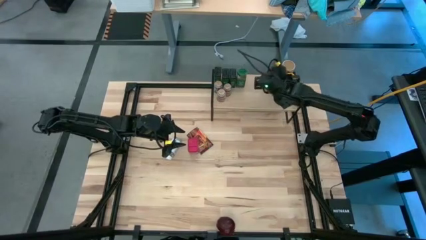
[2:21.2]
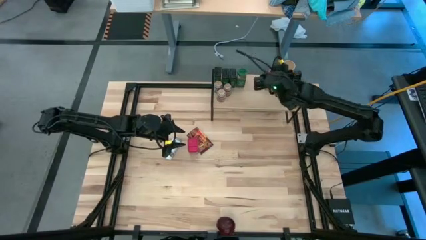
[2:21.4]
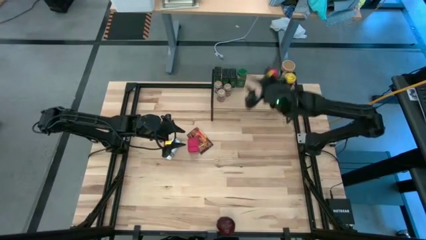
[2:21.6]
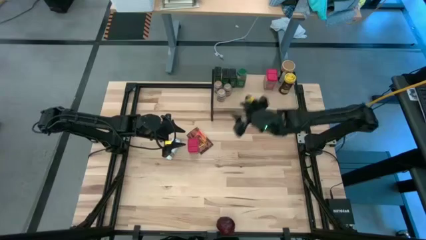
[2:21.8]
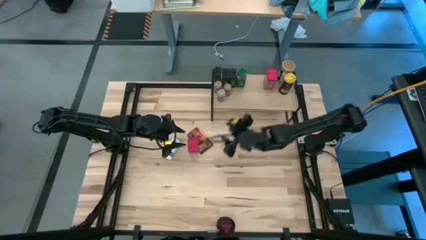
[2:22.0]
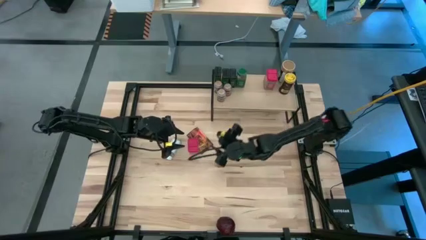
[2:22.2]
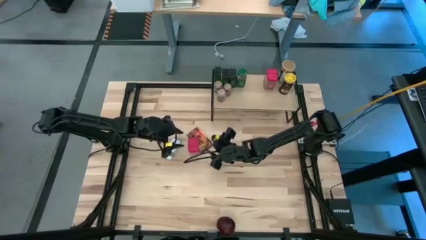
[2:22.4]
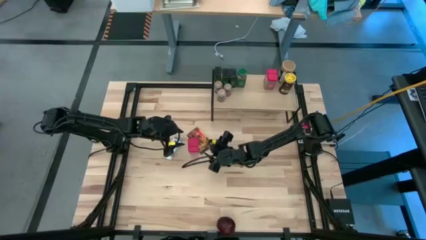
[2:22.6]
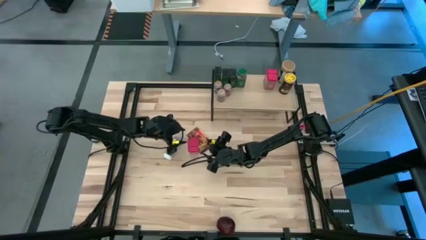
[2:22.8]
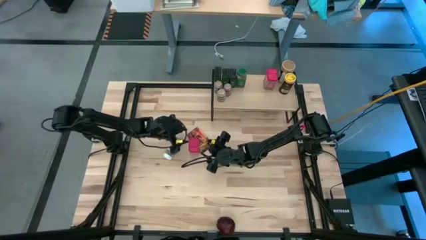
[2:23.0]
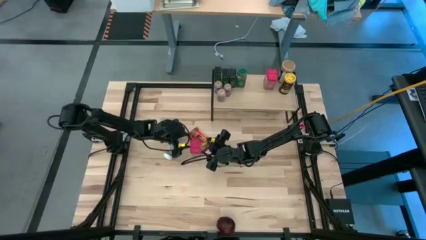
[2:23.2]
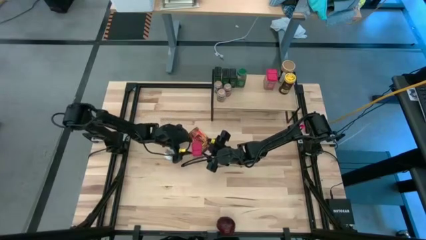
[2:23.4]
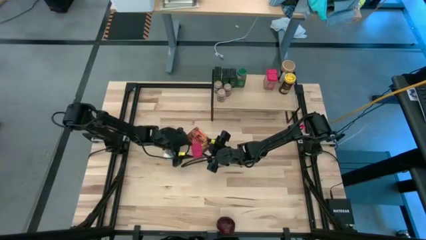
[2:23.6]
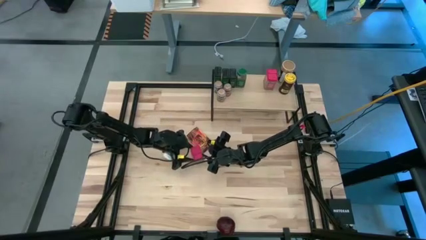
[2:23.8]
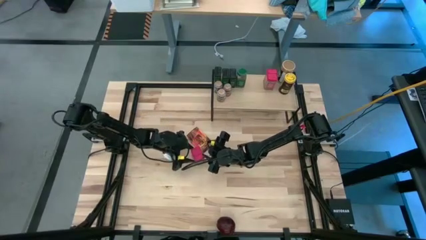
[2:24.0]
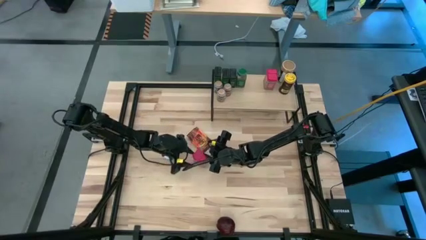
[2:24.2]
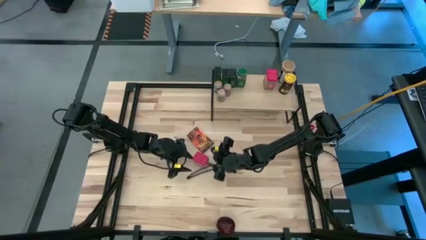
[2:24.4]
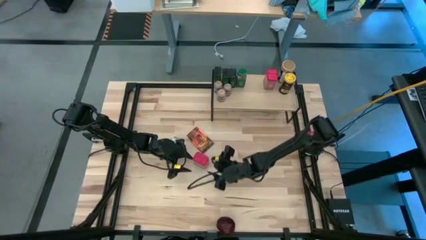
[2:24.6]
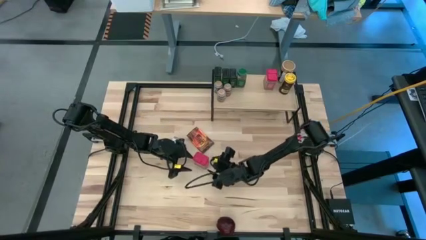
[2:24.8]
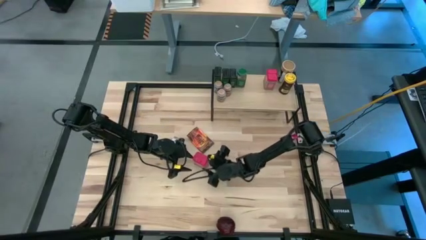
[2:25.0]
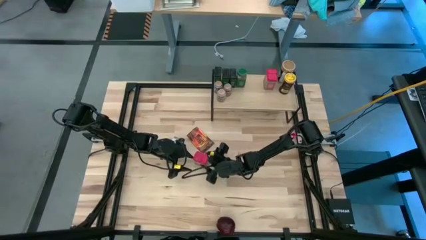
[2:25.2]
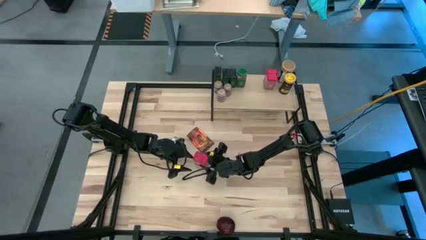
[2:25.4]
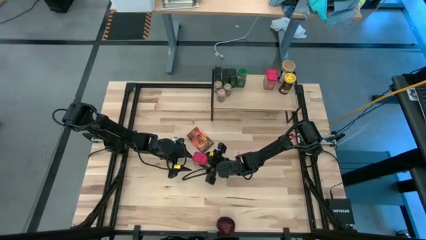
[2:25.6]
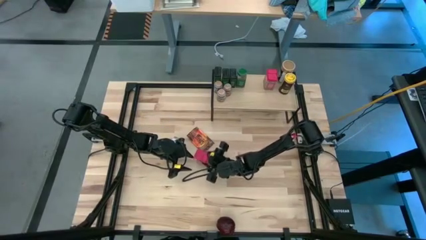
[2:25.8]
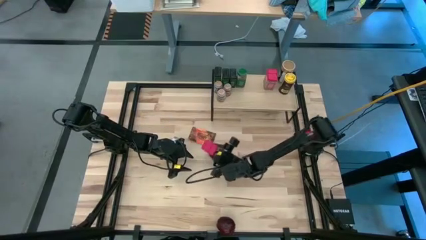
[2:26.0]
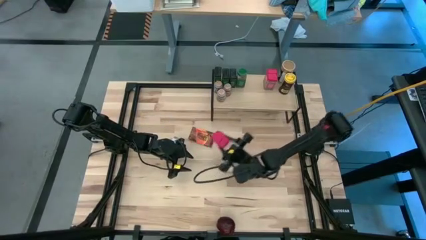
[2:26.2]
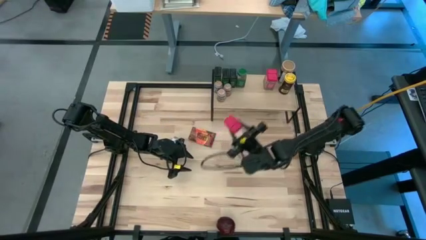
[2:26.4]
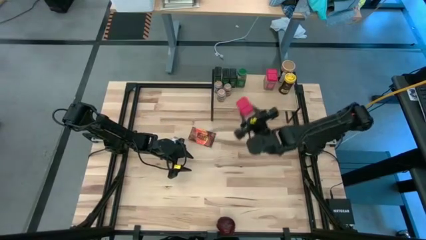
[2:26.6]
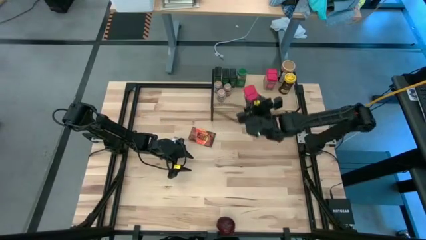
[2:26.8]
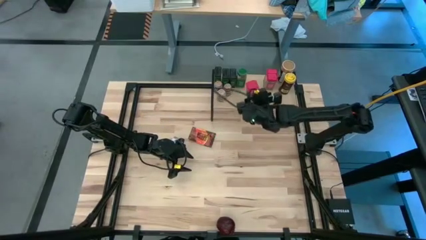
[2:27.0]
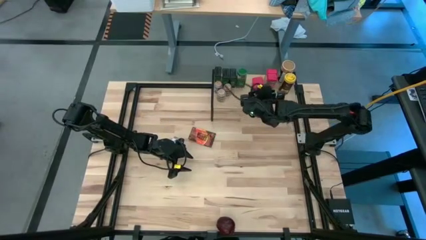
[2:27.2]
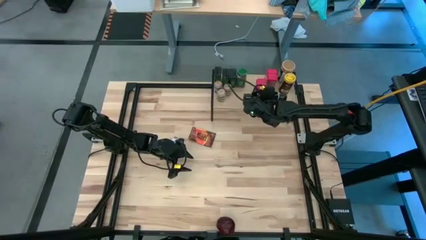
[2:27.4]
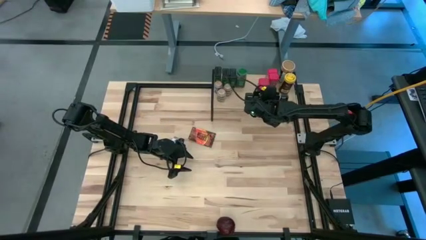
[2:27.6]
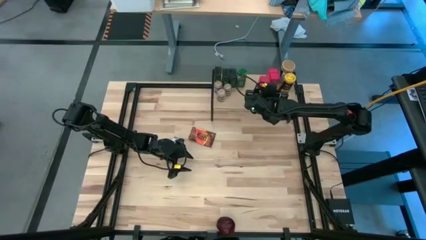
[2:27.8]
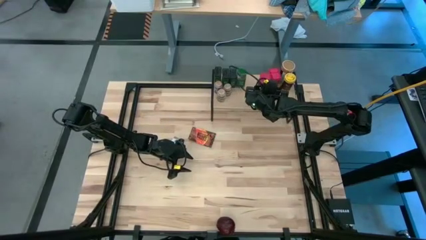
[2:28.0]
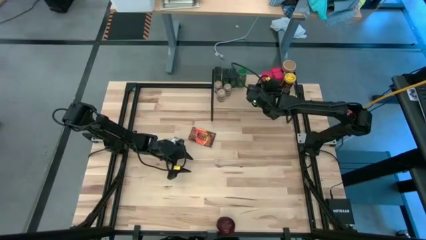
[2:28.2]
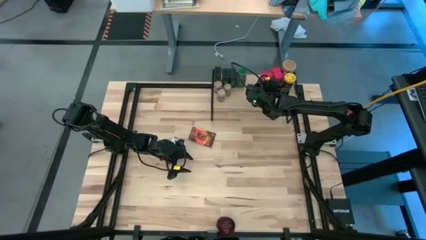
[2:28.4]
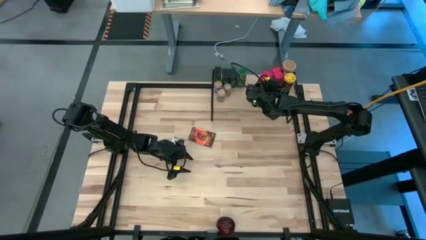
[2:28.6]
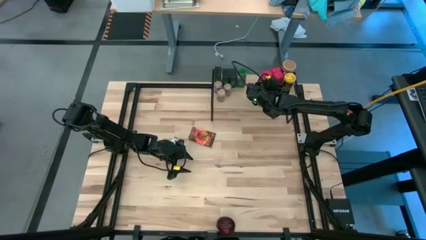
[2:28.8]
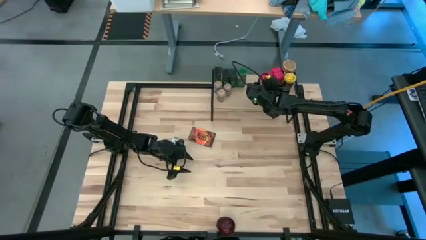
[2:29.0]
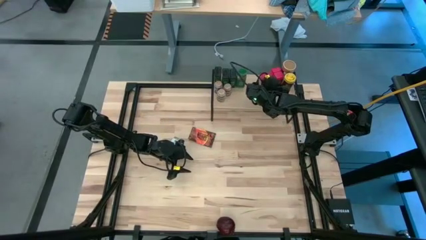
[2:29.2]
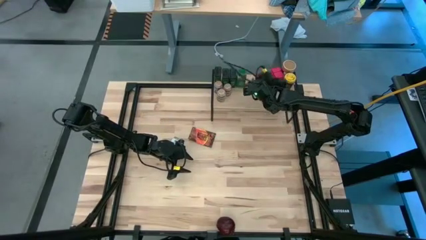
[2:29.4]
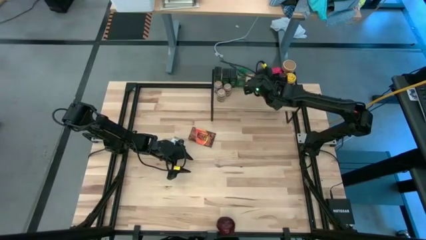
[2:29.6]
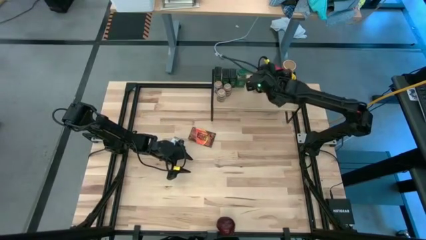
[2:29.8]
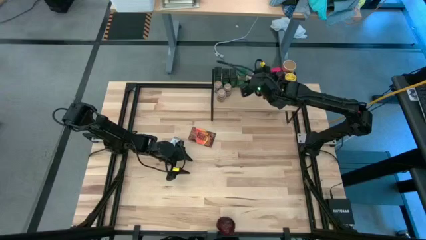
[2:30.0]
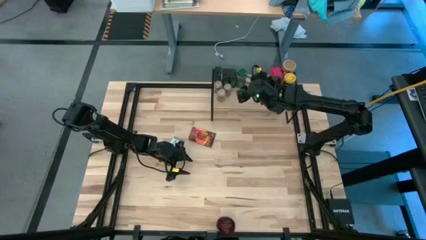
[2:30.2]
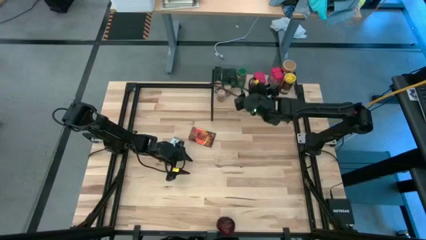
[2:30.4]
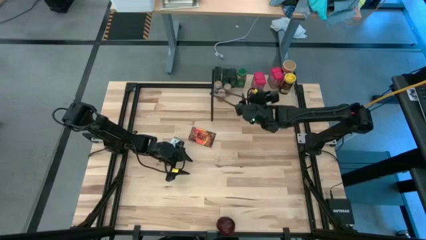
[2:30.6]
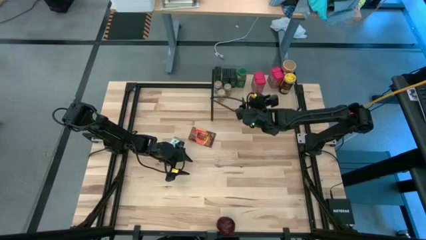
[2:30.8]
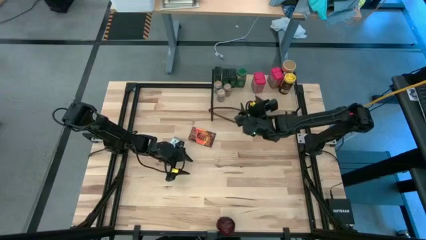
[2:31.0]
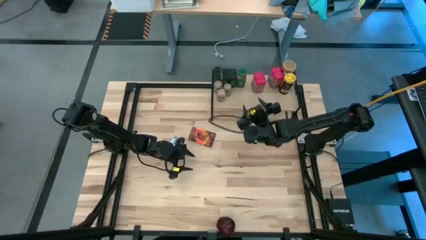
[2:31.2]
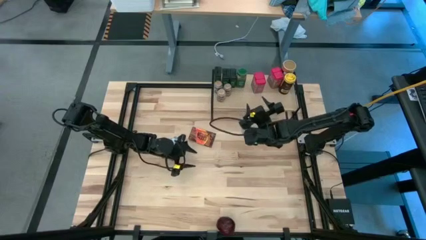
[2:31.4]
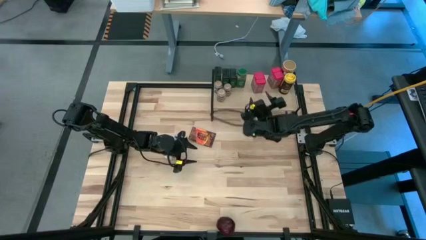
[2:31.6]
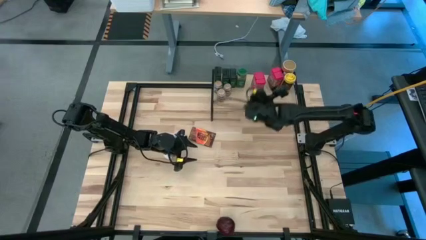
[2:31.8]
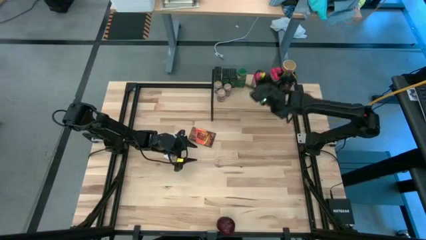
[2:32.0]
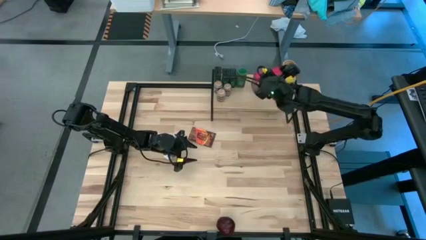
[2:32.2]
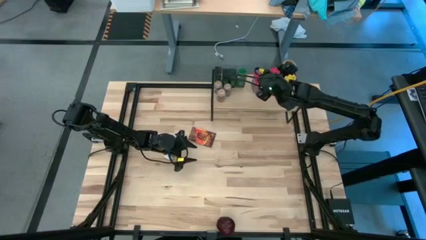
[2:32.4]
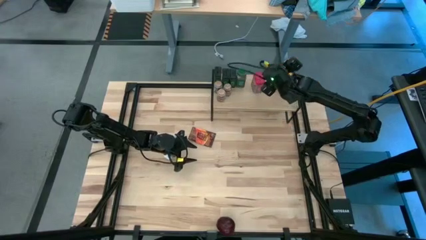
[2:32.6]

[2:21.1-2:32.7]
Task: Shelf spices
Put the red seasoning can on the shelf

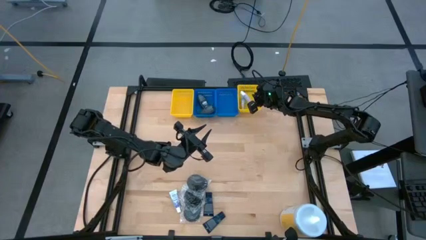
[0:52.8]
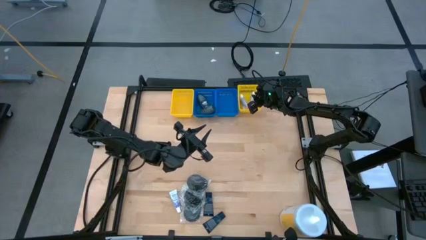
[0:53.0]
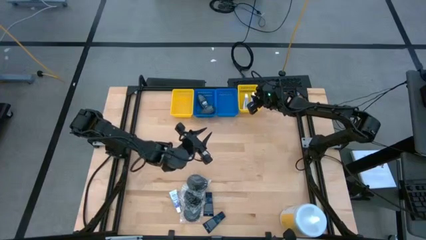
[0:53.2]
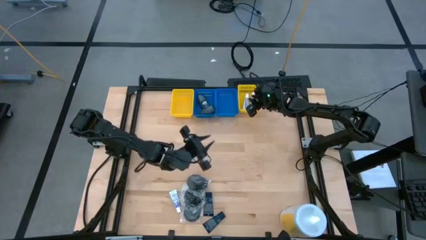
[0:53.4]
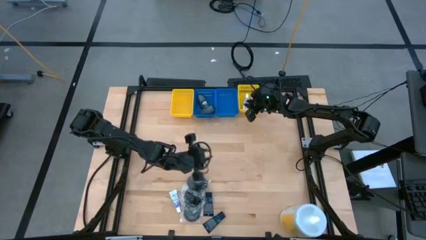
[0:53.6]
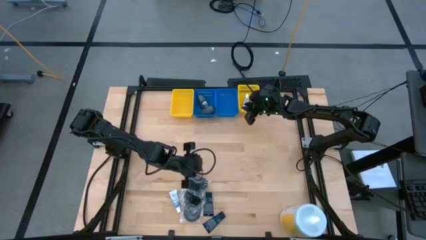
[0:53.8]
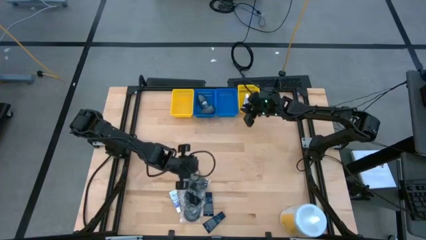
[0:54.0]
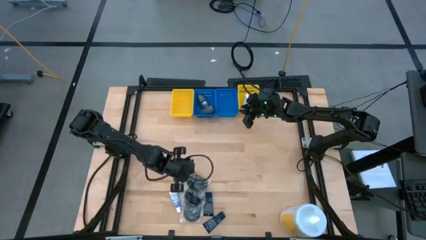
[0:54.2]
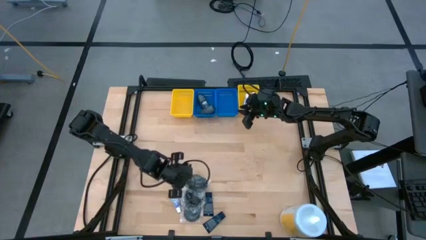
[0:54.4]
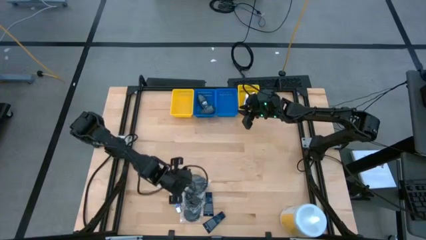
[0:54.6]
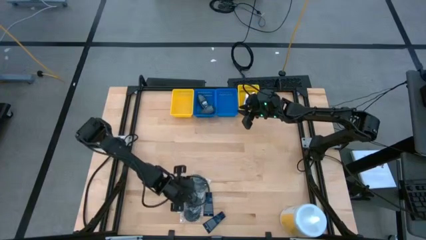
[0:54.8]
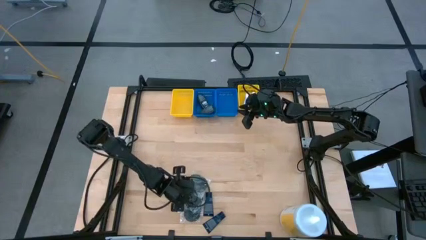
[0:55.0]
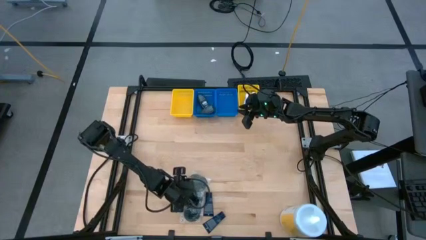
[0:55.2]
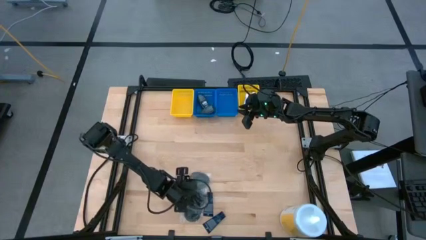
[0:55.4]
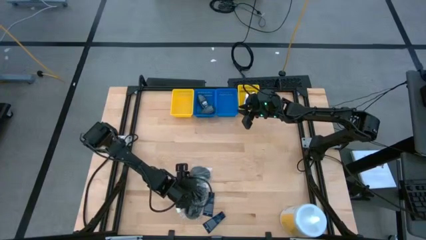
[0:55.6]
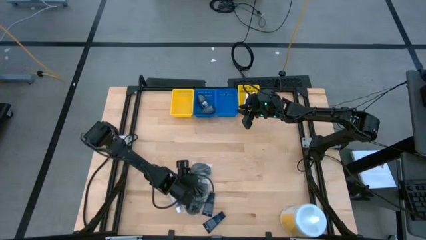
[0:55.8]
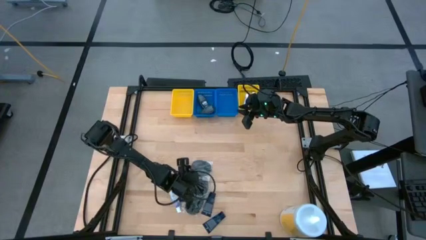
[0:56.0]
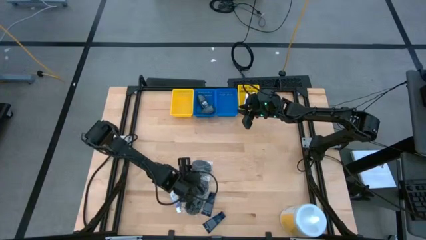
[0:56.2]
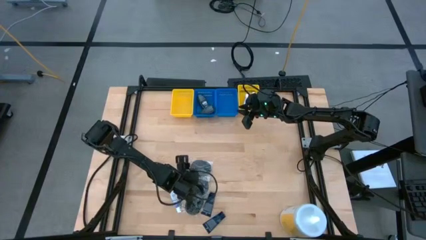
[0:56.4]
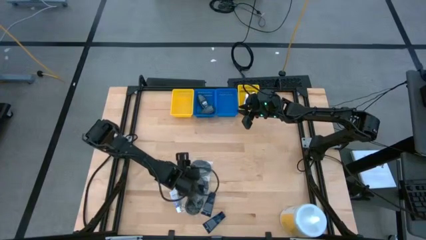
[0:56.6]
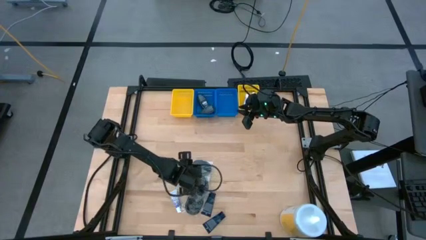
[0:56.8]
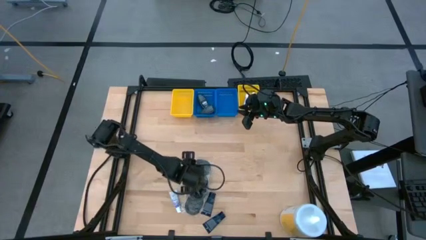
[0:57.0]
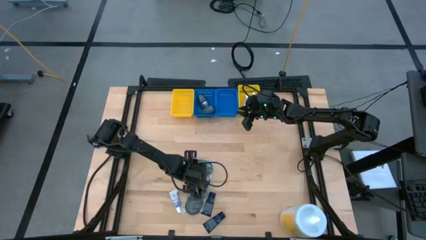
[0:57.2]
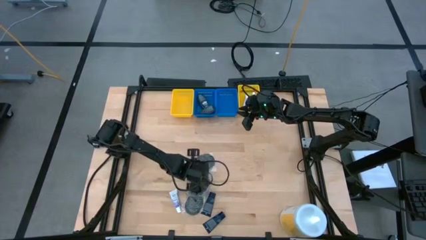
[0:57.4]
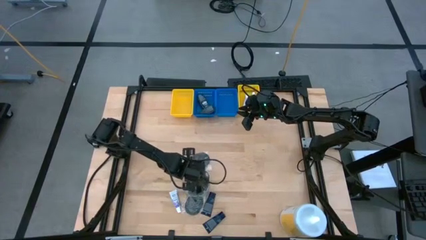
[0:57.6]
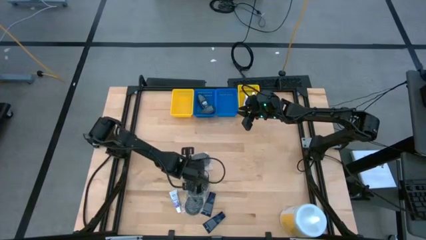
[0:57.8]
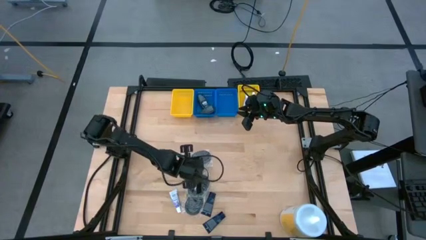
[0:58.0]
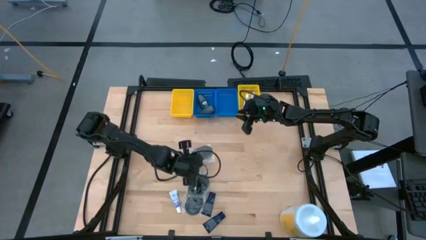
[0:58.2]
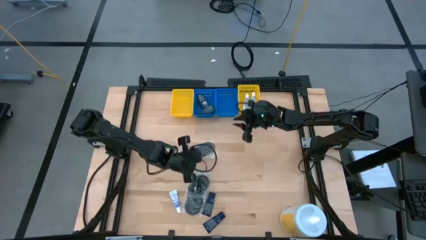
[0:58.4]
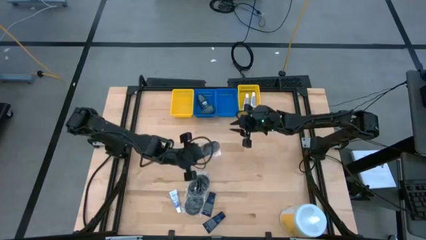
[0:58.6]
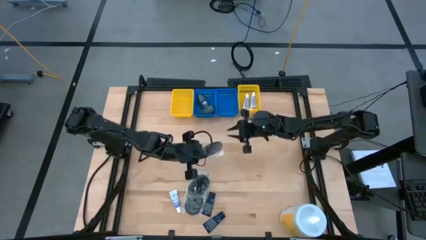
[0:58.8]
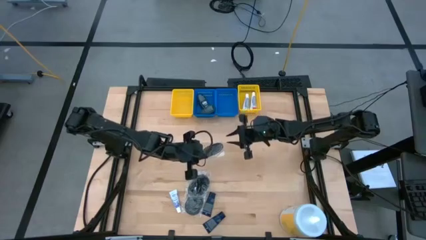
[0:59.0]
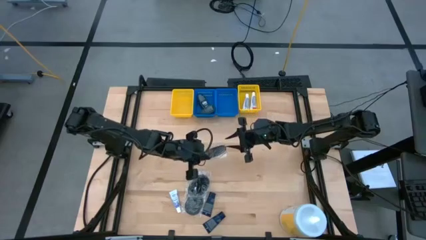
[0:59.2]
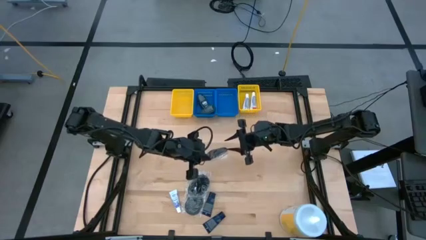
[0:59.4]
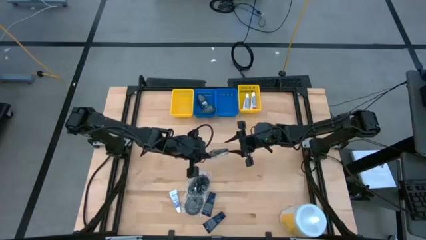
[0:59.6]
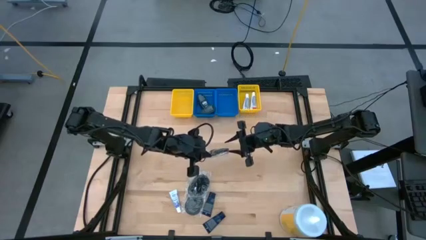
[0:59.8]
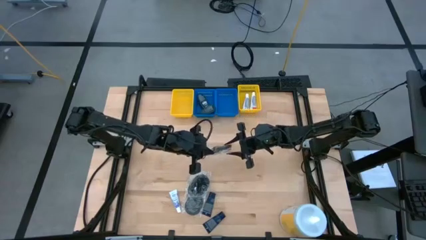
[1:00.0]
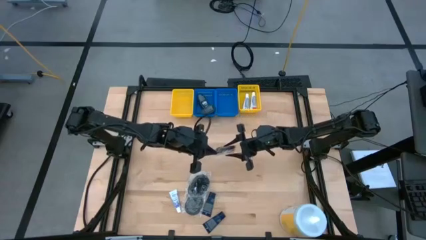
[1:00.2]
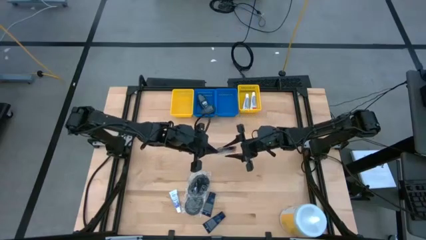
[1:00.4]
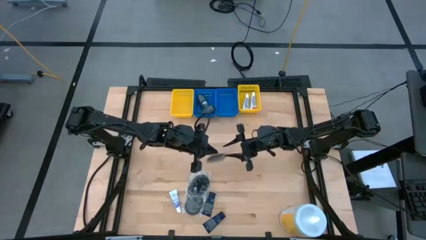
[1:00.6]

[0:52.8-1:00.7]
Task: Pick & Place Travel size toiletries
Put the black hairbrush into the right blue bin
